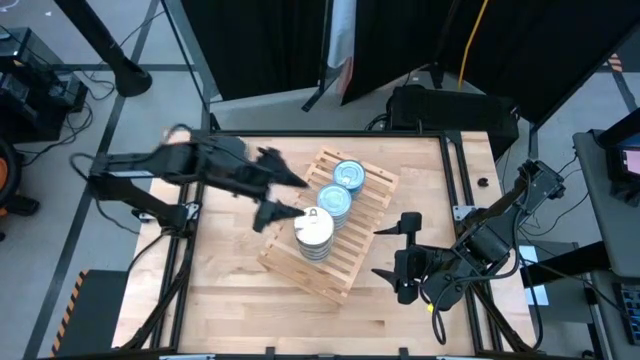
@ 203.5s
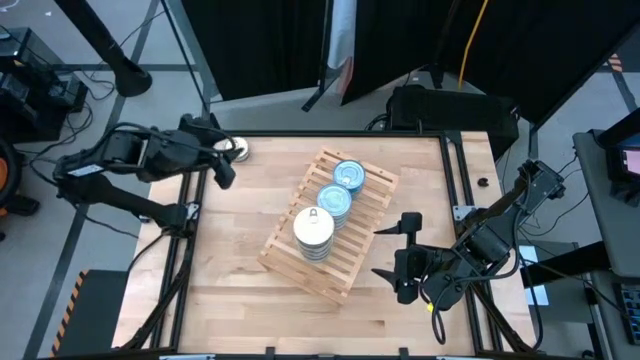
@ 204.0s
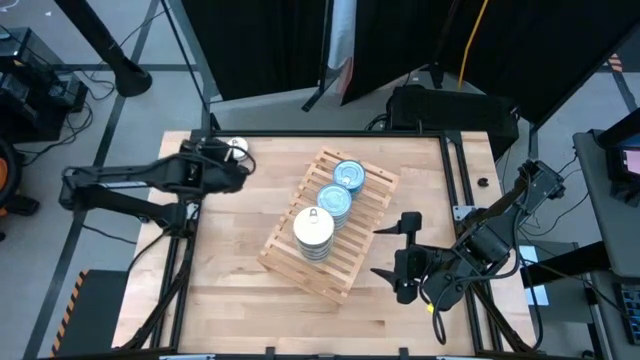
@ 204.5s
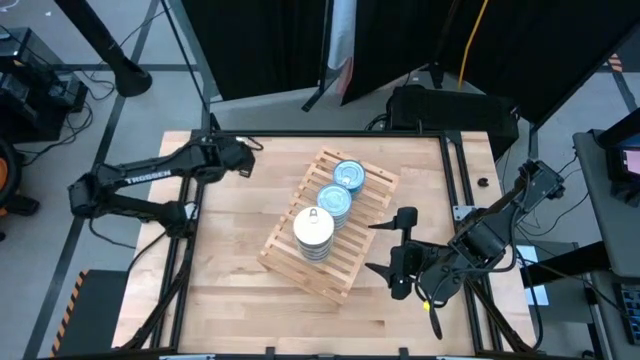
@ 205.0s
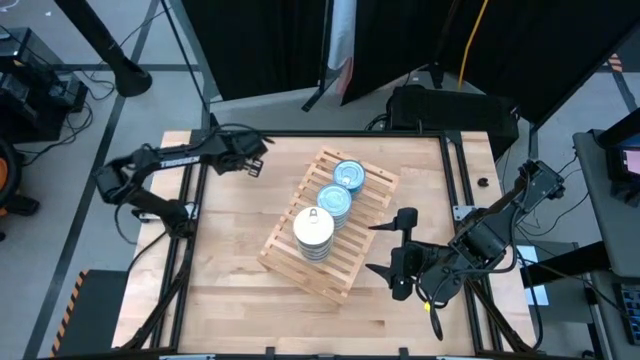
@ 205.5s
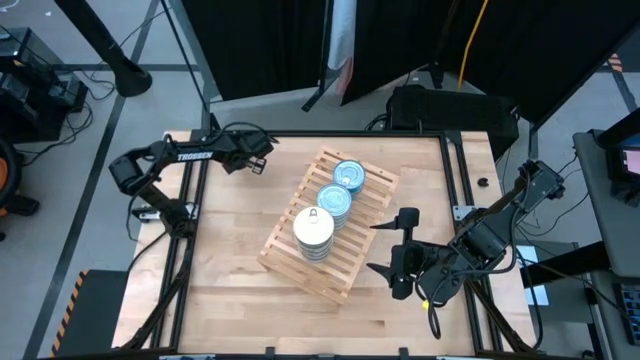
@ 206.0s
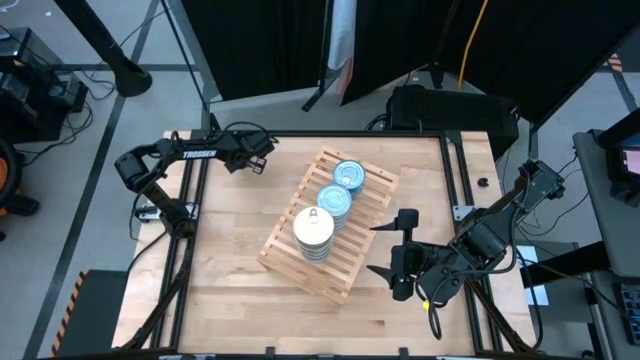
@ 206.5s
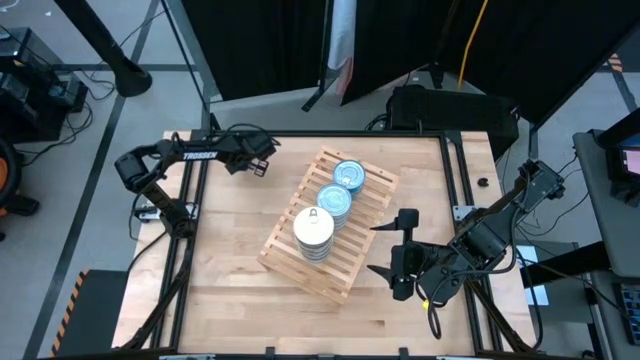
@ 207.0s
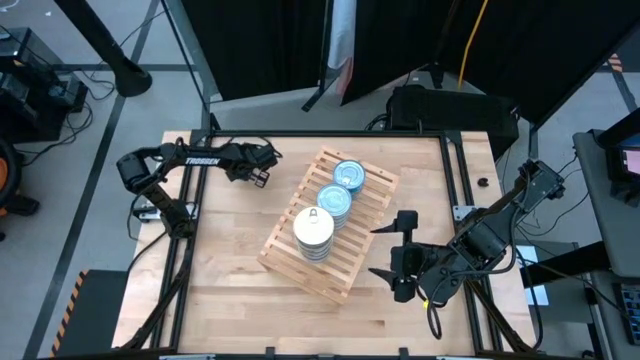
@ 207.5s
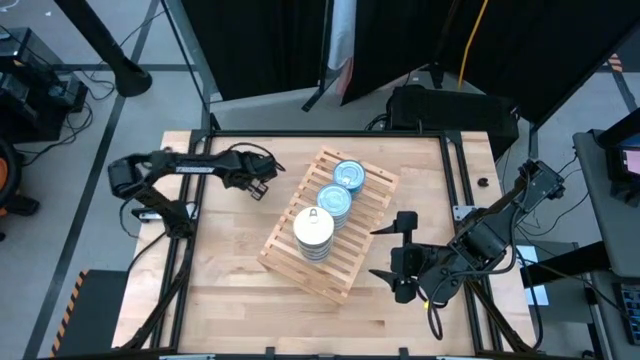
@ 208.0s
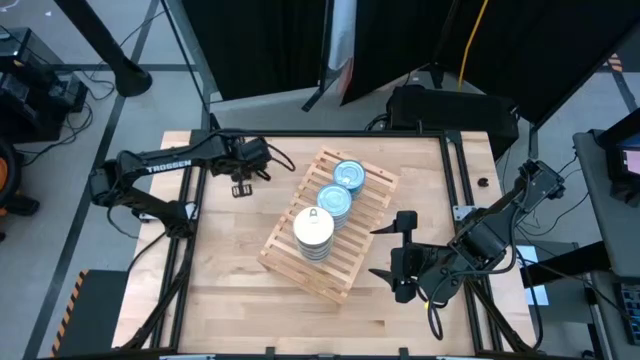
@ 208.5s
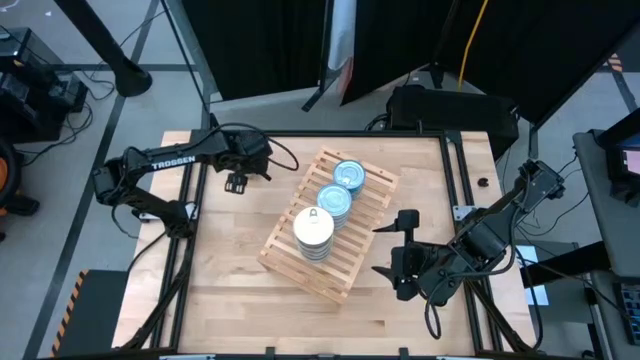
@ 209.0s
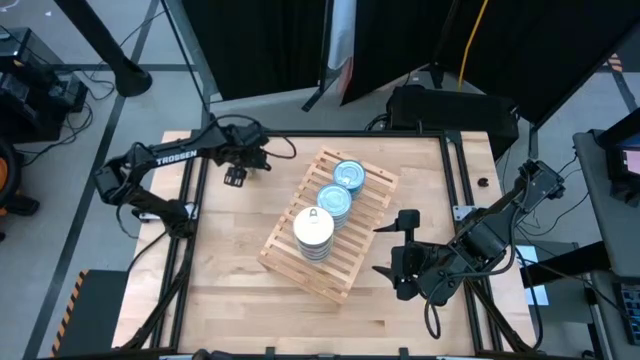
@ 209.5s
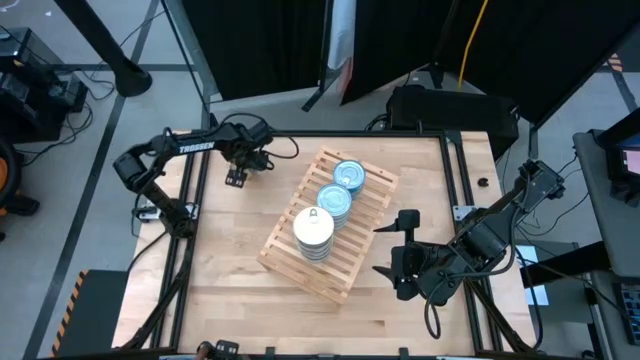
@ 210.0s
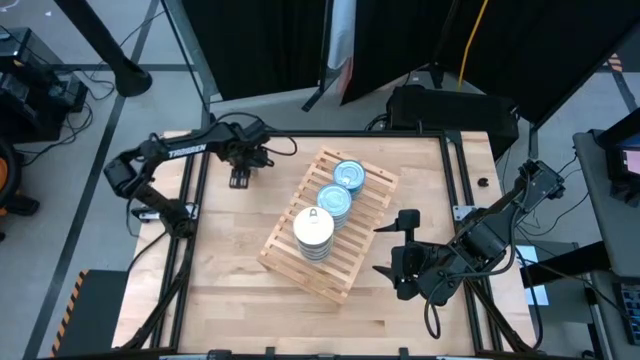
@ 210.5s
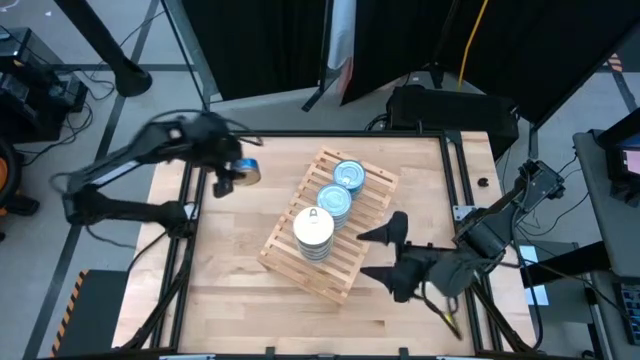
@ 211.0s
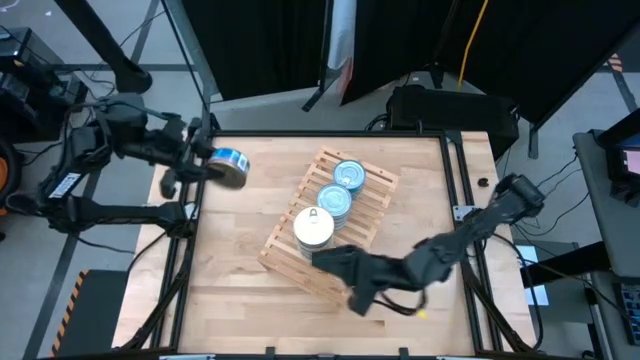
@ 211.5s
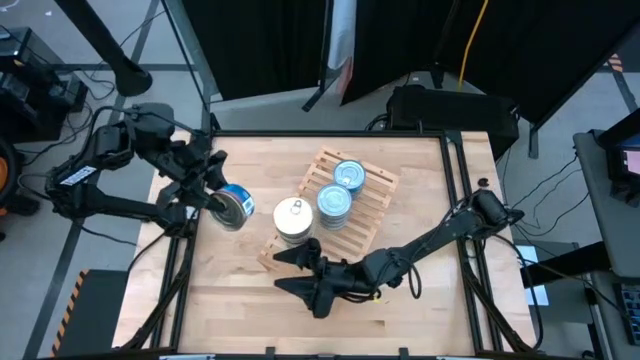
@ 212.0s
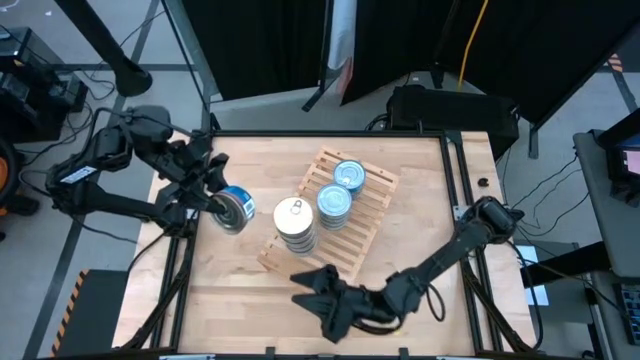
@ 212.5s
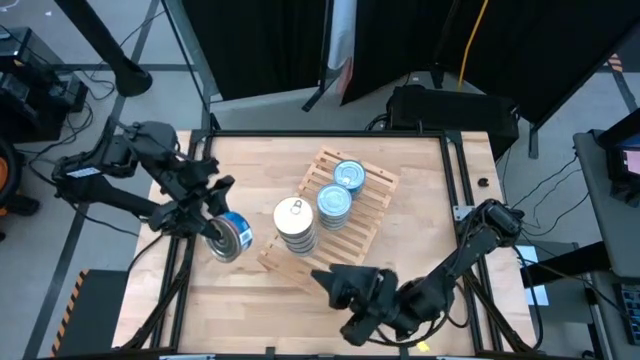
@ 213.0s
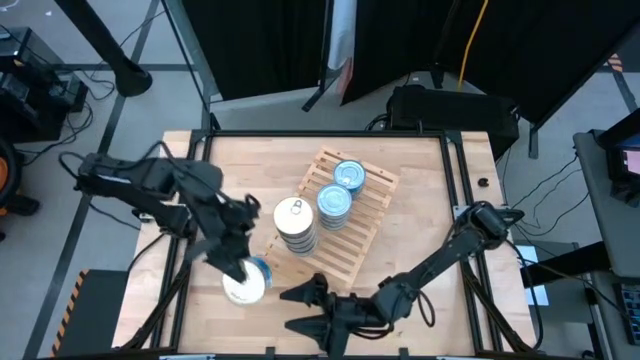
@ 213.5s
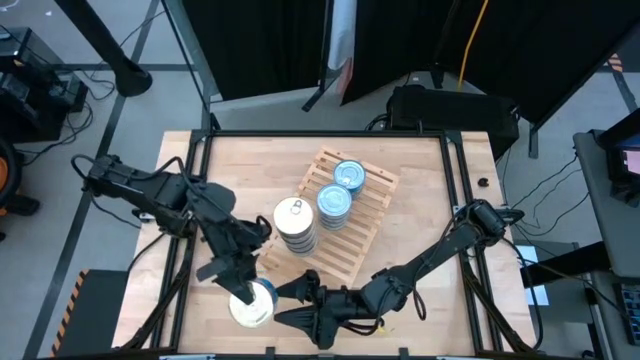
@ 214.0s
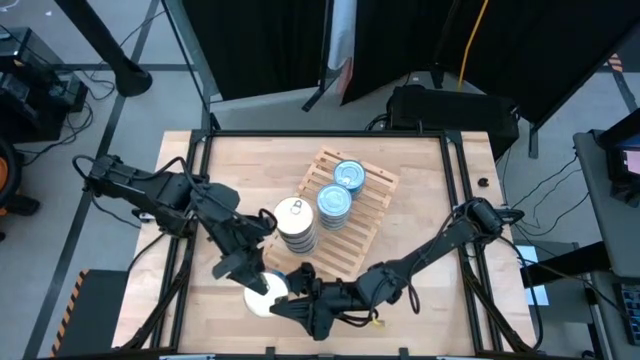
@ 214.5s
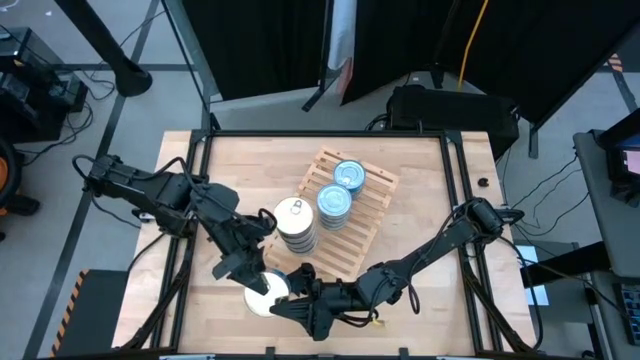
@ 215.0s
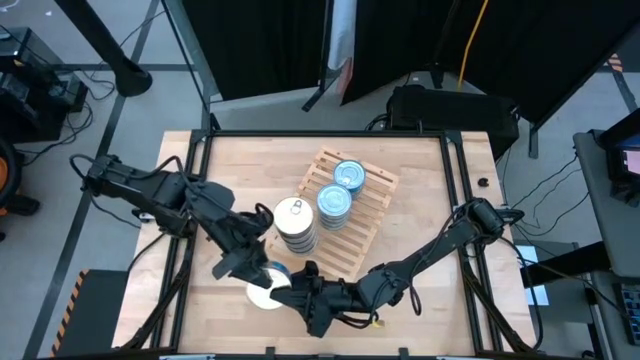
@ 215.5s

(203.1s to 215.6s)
Task: Stack canned seafood by type on shelf
Stack the blue-pink tuna can on top of the other blue-pink tuna can on the shelf

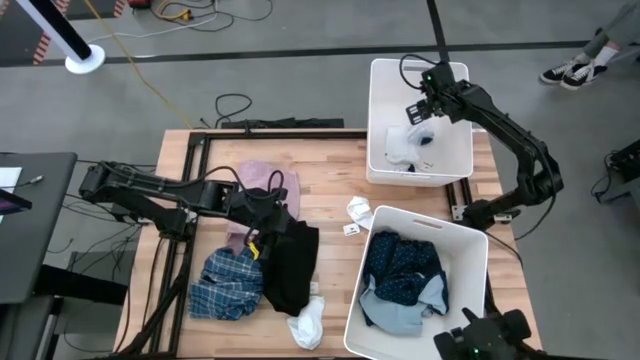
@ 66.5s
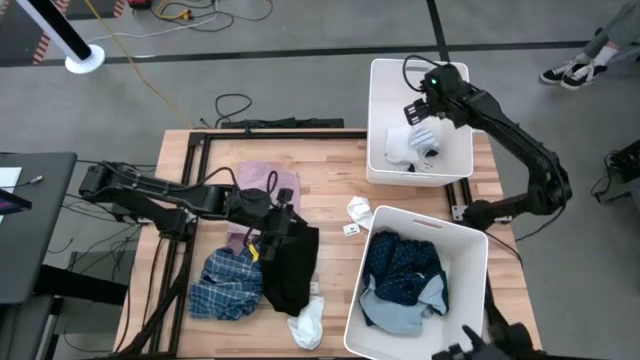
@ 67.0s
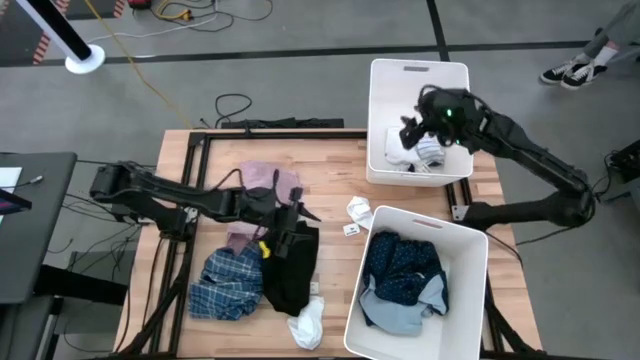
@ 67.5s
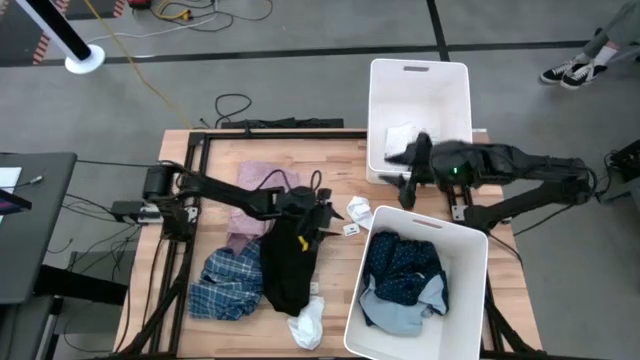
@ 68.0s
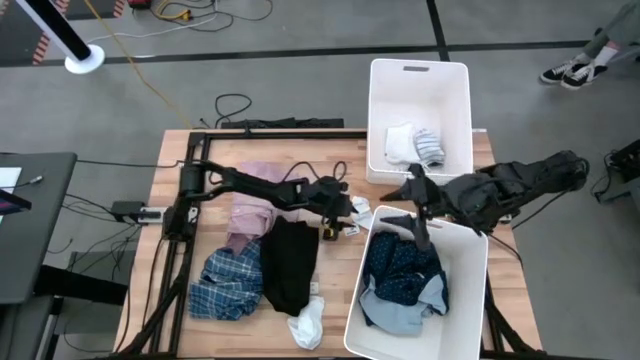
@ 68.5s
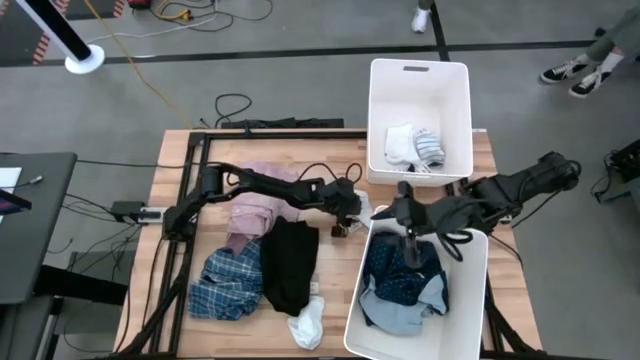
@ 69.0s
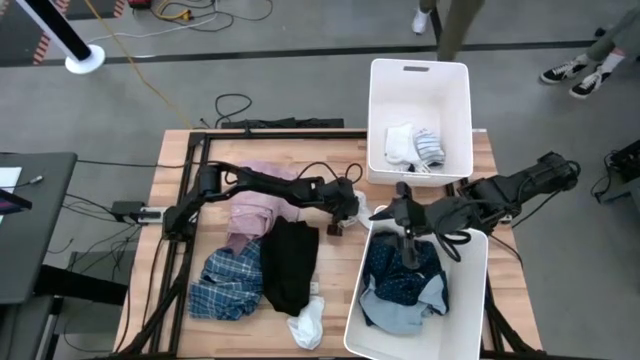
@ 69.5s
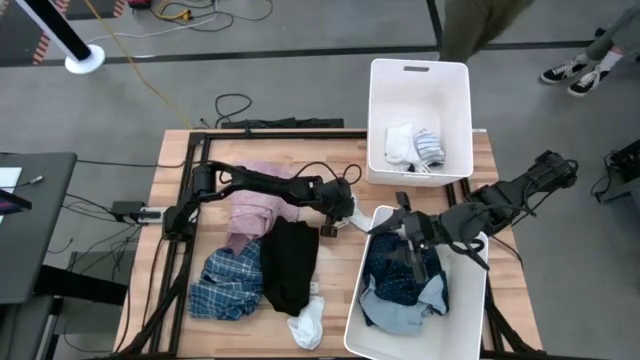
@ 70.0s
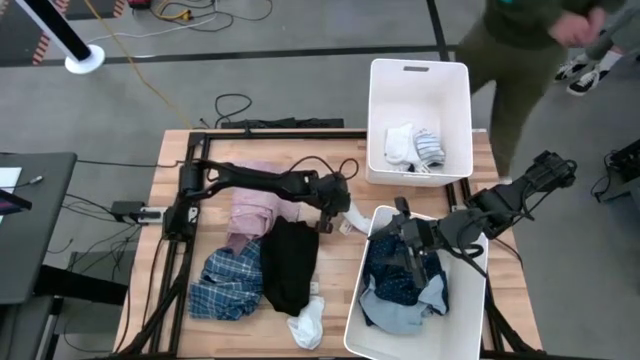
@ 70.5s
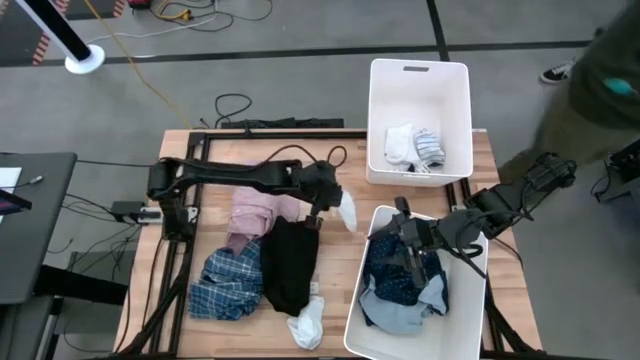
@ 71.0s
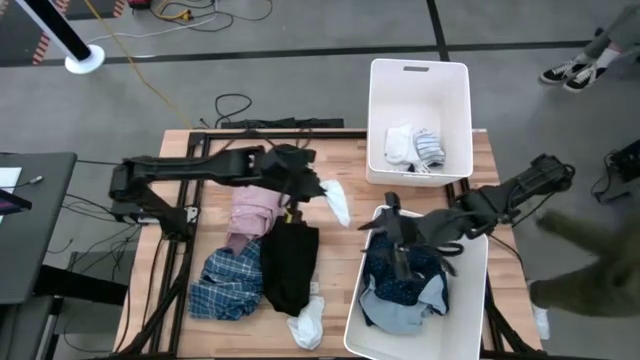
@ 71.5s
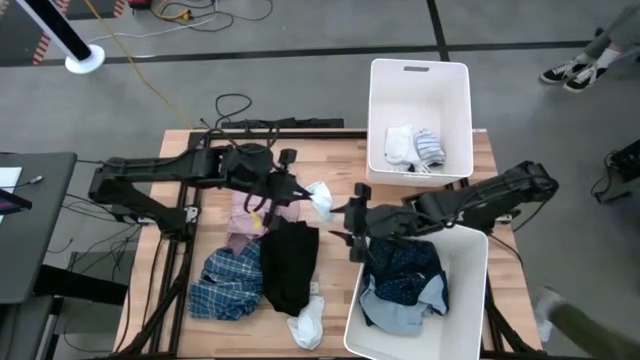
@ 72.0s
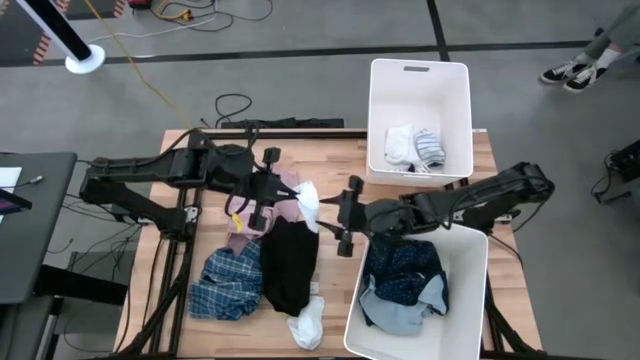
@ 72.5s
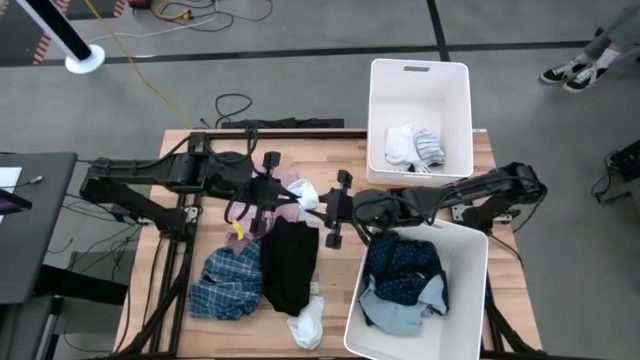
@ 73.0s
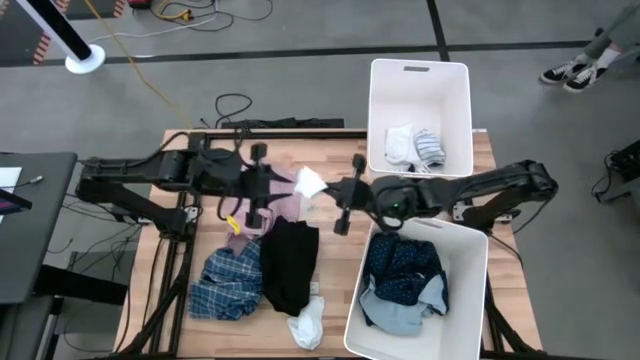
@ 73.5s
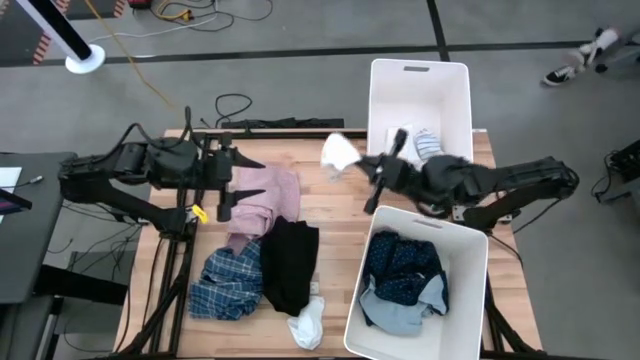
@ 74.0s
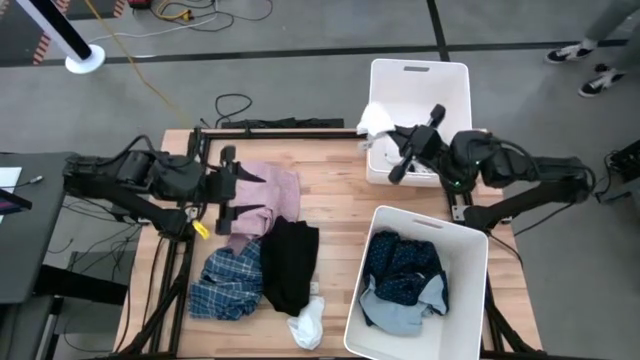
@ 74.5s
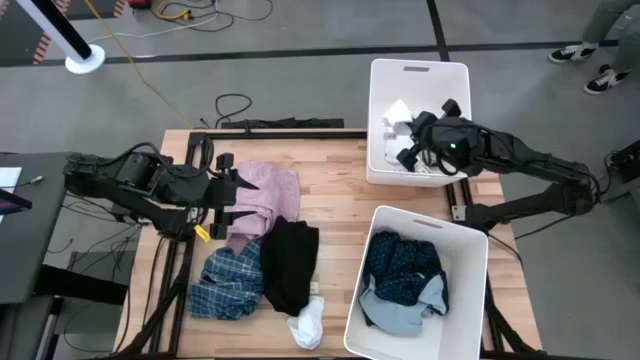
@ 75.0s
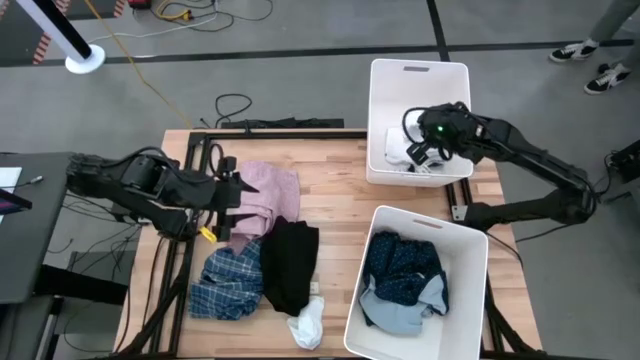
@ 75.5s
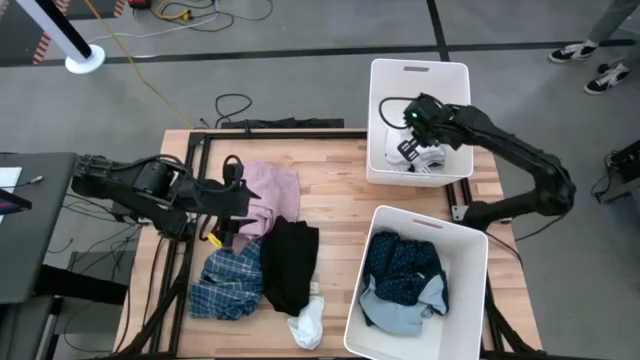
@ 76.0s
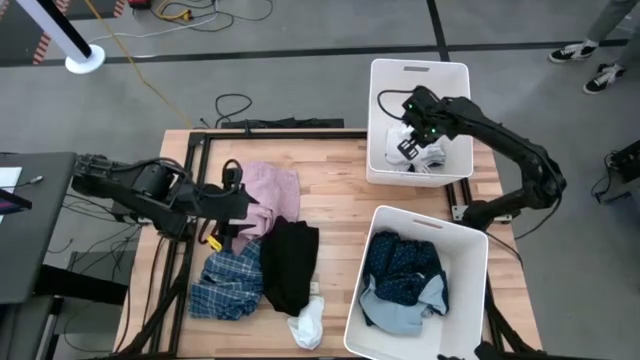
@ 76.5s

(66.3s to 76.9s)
Task: Sort clothes
Put the top white sock in the top laundry bin
